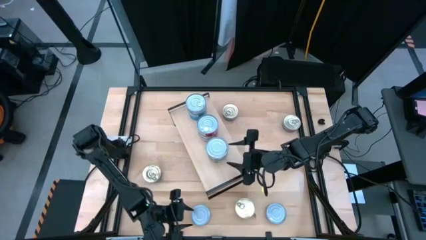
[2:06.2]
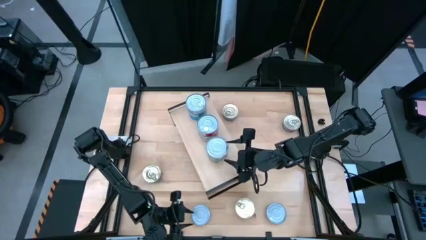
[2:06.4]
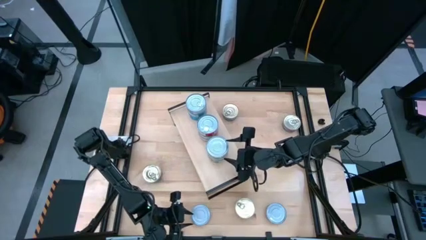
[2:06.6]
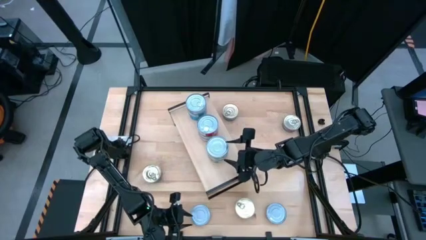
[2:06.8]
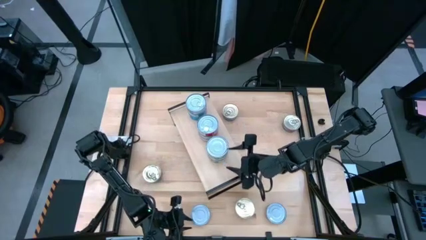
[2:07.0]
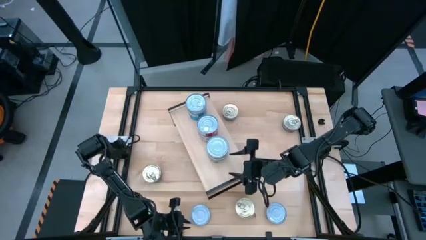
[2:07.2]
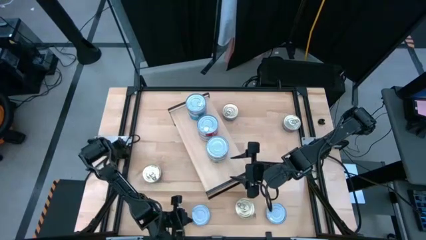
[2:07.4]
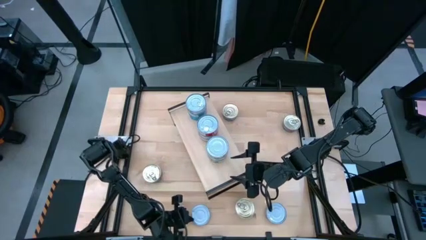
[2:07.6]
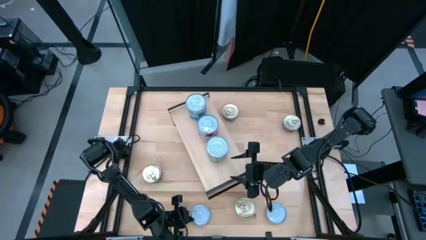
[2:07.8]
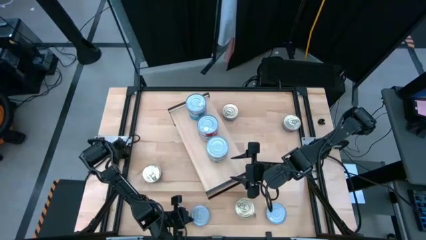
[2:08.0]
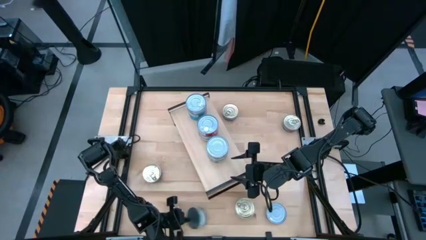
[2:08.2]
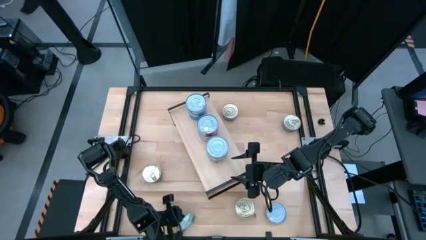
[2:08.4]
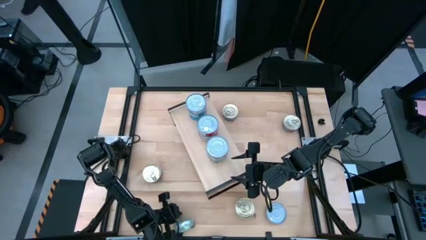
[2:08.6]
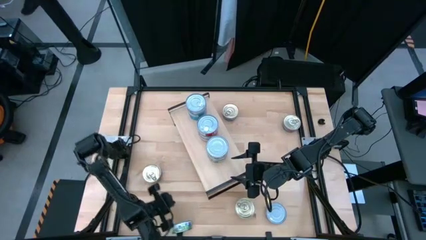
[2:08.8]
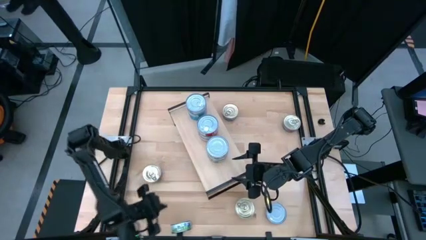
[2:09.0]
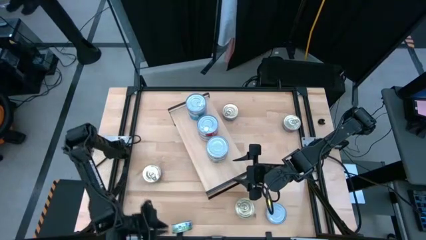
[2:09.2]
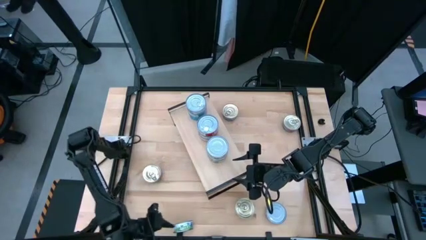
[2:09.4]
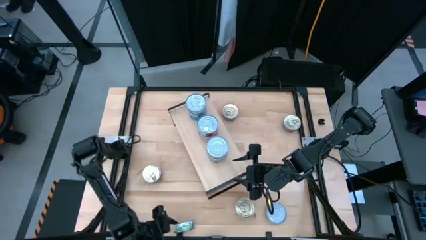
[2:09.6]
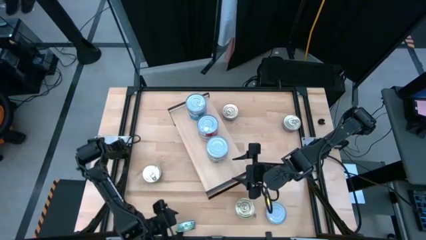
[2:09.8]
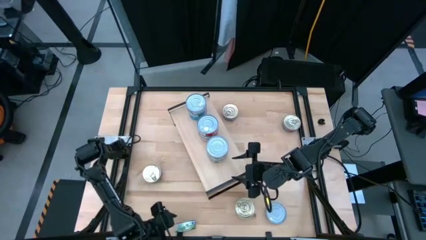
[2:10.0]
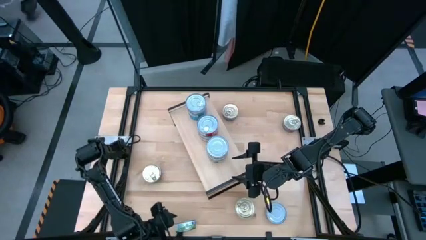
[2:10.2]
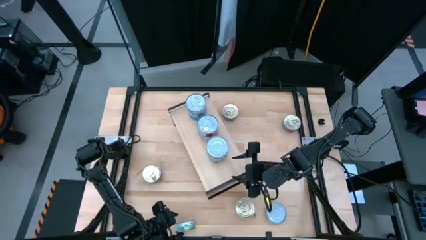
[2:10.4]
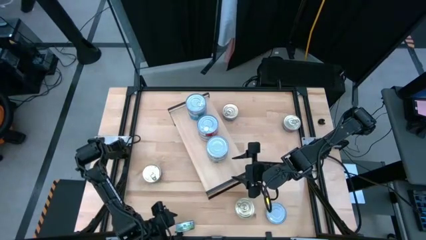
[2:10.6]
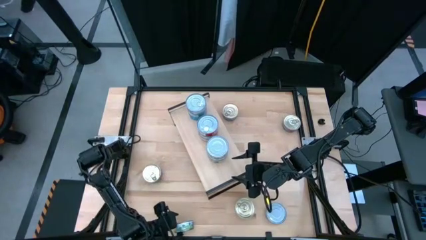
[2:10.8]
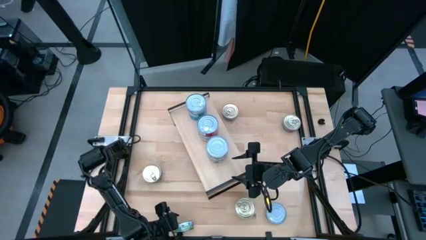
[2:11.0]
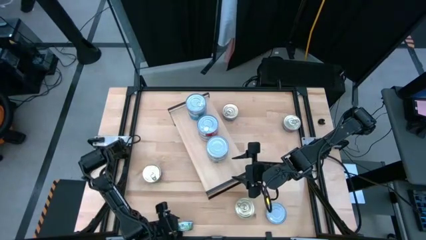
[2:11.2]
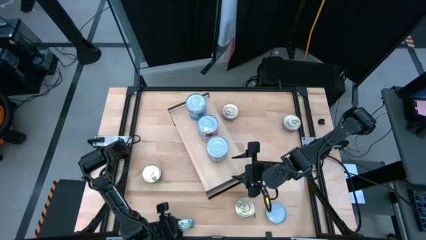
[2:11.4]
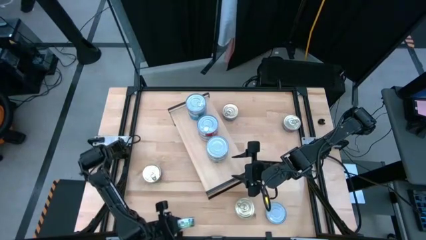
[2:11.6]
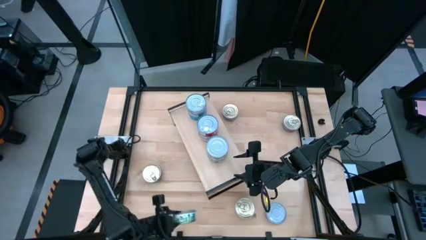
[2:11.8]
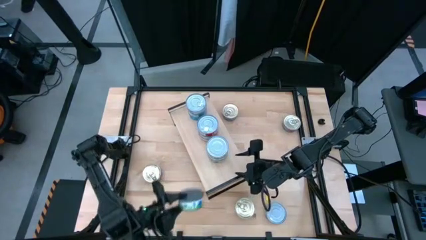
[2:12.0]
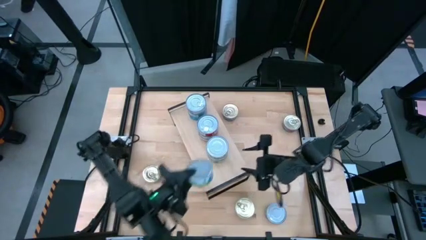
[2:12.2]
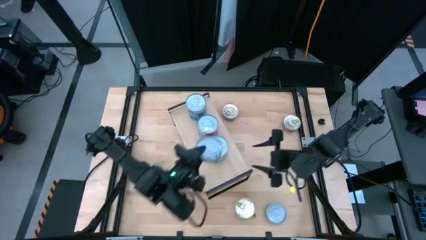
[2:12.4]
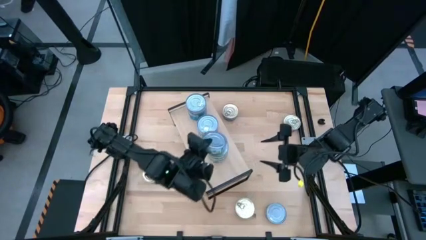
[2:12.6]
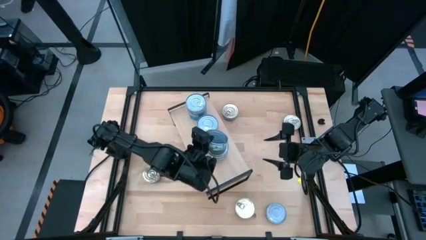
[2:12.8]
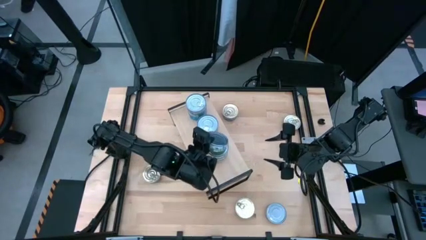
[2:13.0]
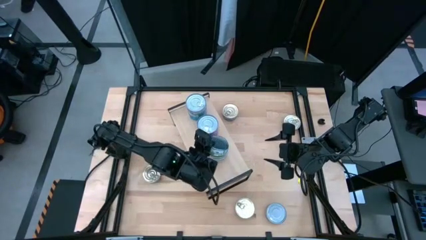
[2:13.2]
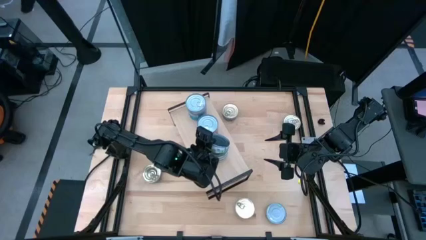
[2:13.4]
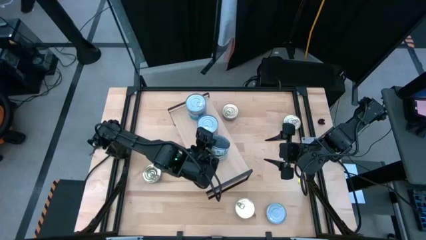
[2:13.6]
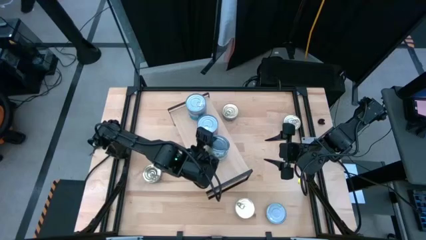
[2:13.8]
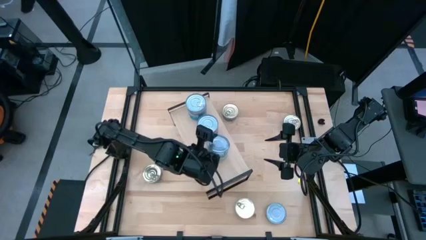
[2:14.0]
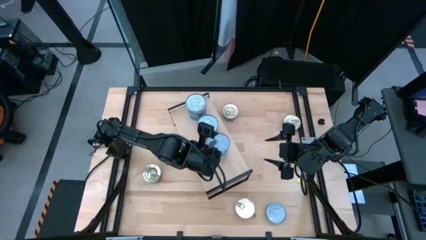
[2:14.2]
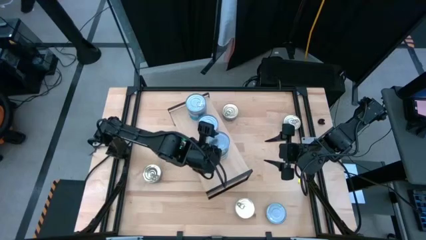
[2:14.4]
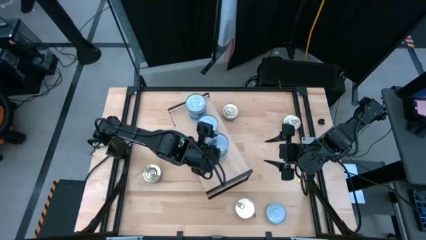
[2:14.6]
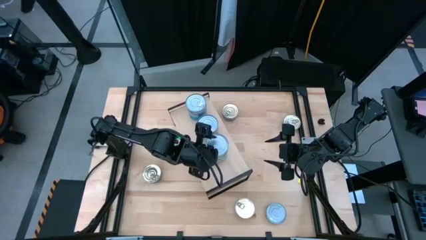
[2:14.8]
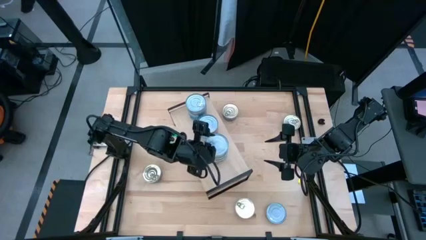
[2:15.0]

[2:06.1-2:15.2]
Task: Stack canned seafood by type on shelf
Stack the green tuna can on top of the green tuna cans on the shelf

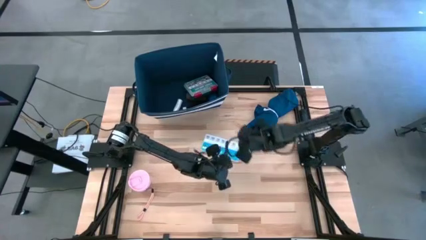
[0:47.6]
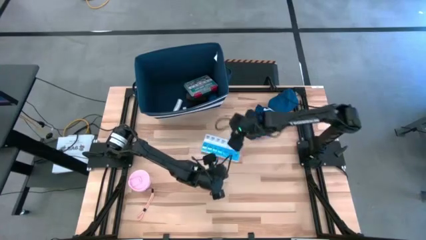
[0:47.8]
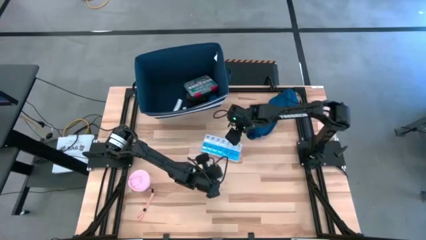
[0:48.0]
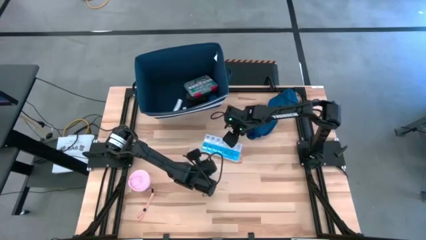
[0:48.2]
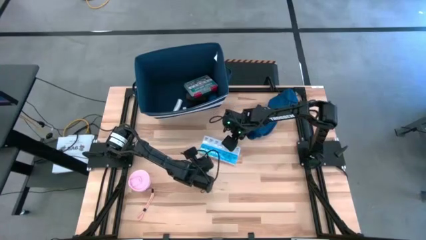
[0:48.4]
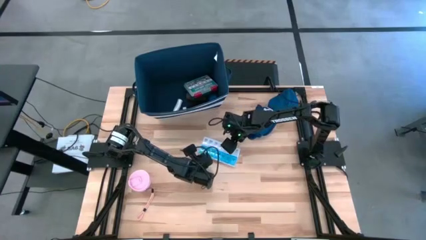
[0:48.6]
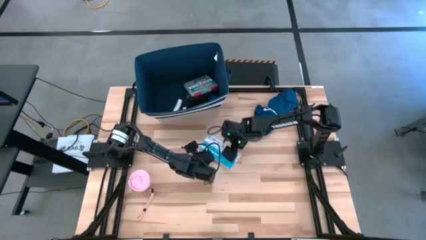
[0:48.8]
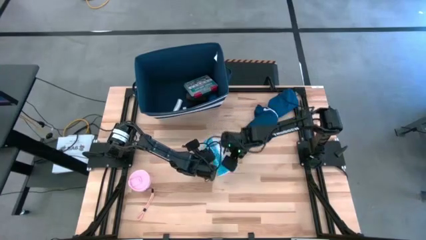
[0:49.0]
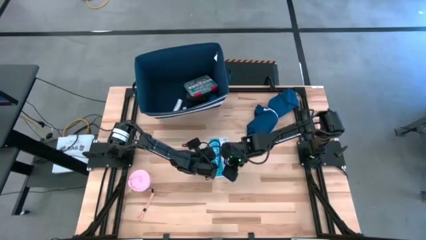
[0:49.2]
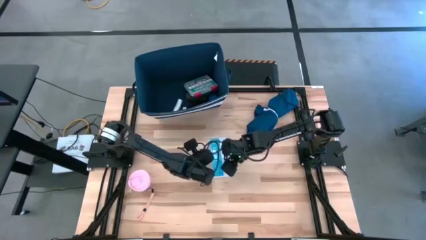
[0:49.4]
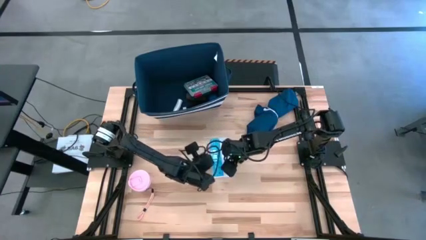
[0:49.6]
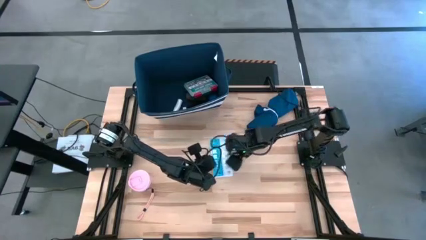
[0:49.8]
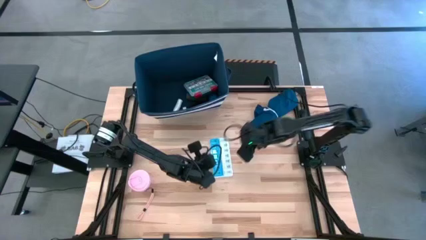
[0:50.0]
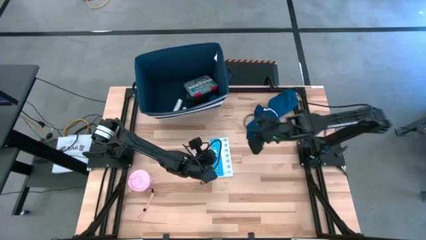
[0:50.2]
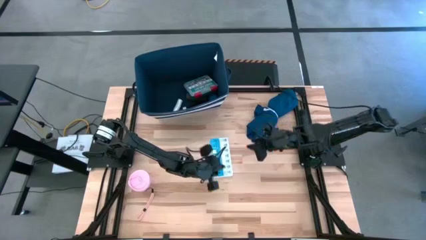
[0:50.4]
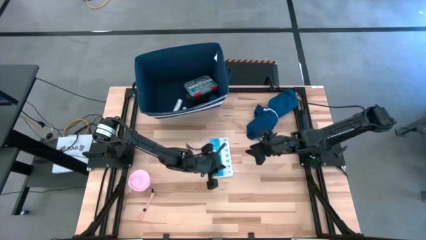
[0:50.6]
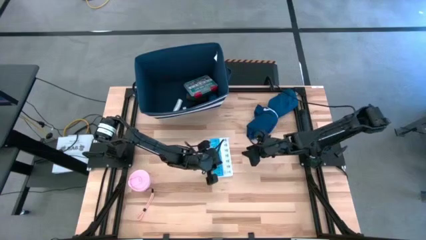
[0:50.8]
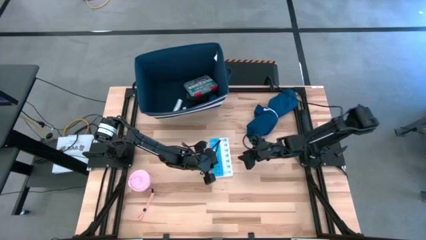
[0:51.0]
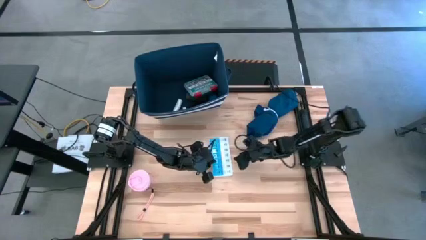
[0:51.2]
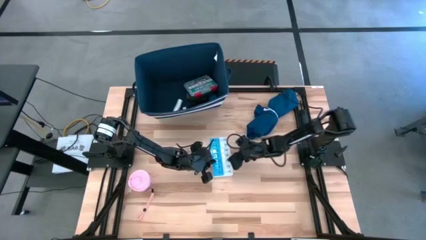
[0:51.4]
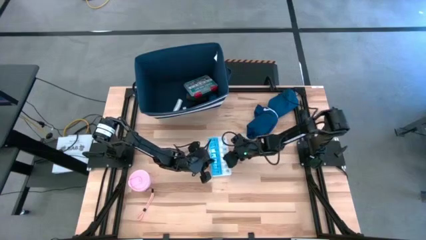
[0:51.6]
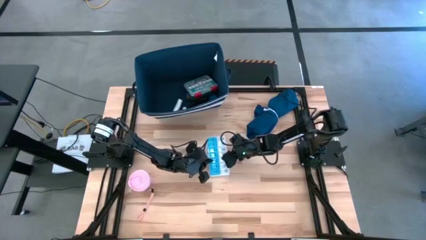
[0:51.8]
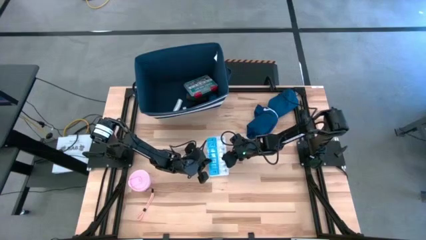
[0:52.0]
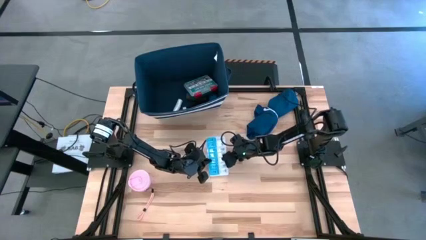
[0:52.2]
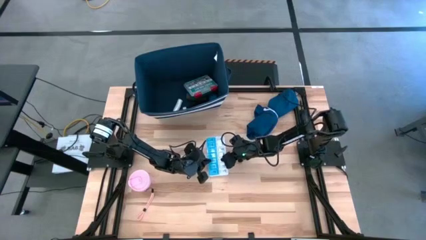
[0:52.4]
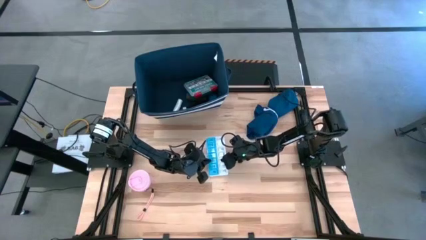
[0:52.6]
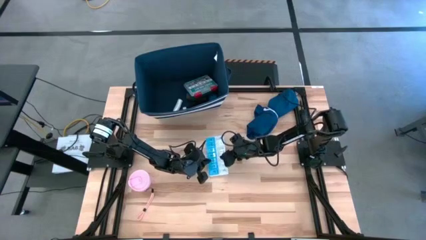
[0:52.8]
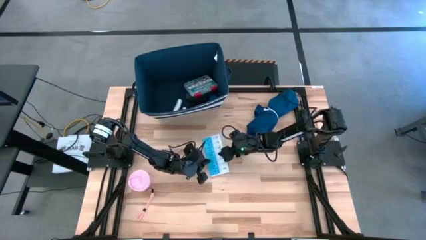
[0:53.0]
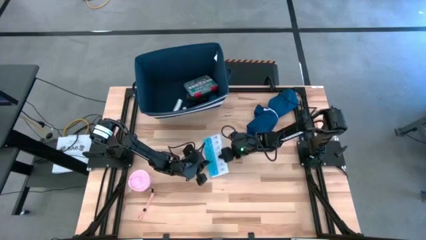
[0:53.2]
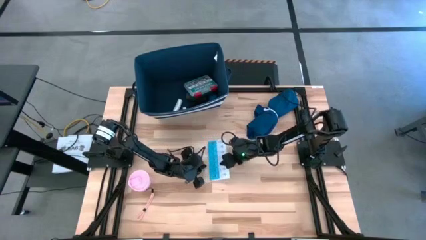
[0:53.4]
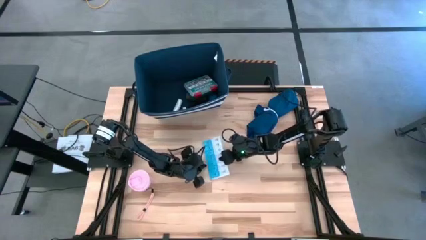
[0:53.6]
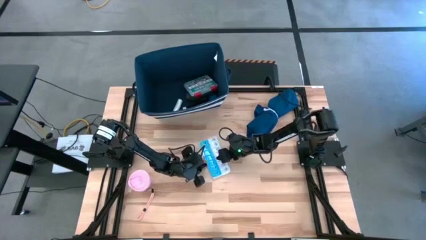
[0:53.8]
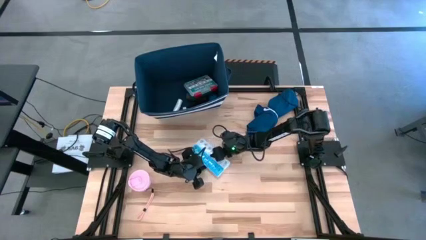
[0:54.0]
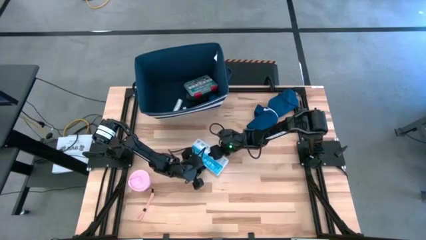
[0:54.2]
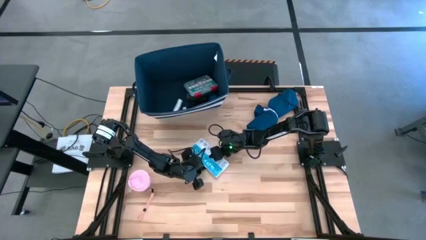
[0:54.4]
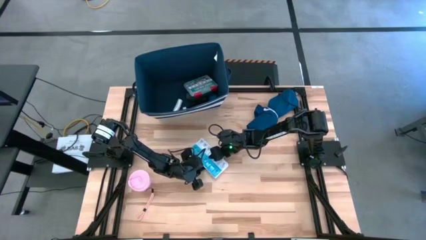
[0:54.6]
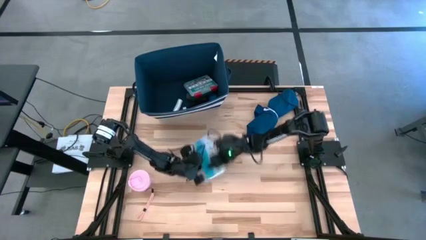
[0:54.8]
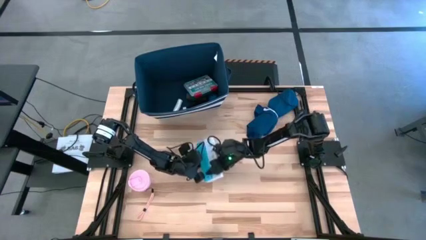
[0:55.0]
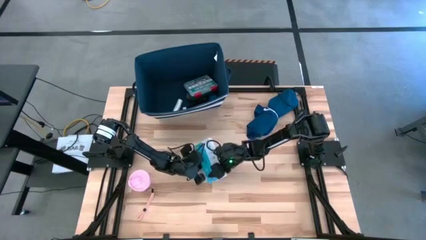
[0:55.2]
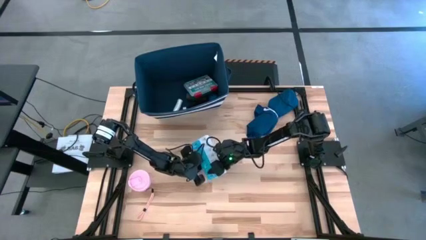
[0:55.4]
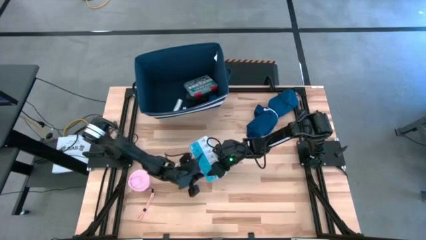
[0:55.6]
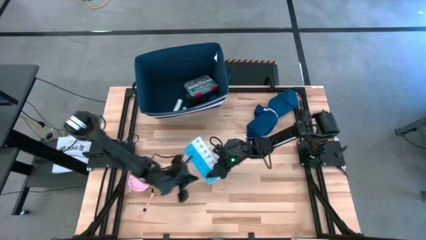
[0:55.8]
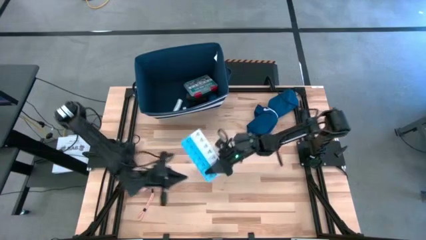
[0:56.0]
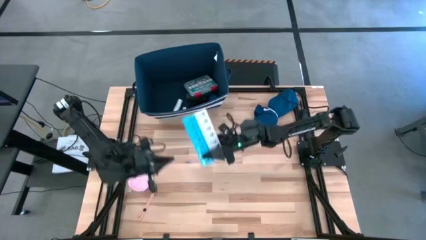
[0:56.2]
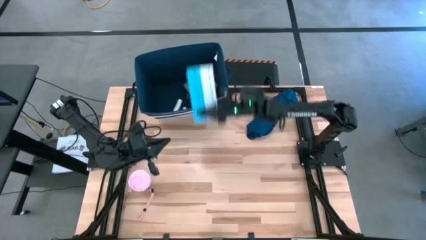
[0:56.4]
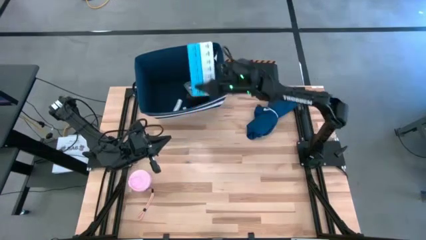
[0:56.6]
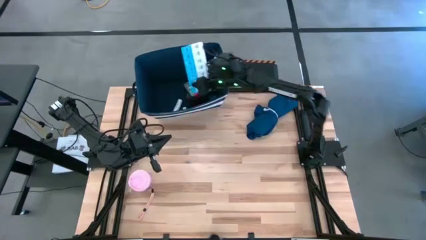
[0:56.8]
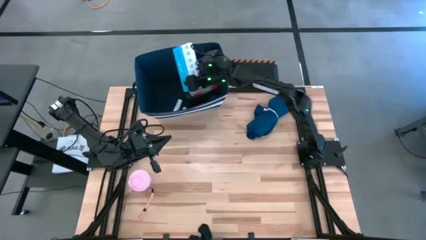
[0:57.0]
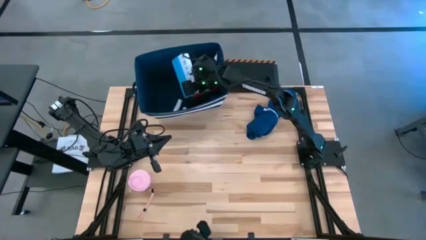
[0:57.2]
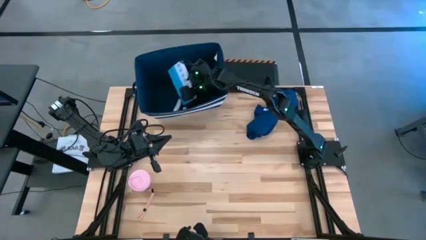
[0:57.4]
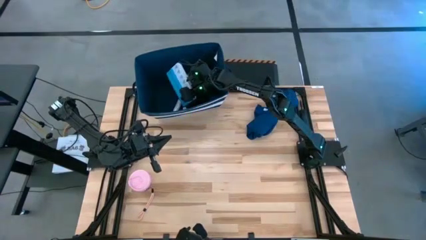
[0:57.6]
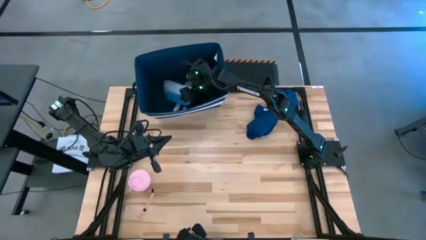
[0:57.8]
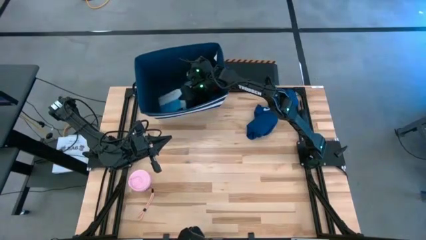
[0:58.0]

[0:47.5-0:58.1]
Task: Pick & place medical supplies in basket/bin
Put the blue pill organizer into the blue bin
